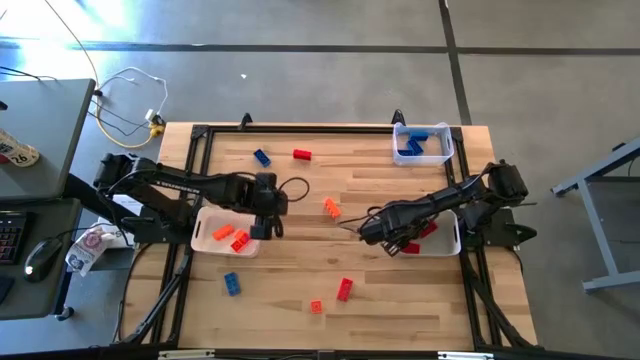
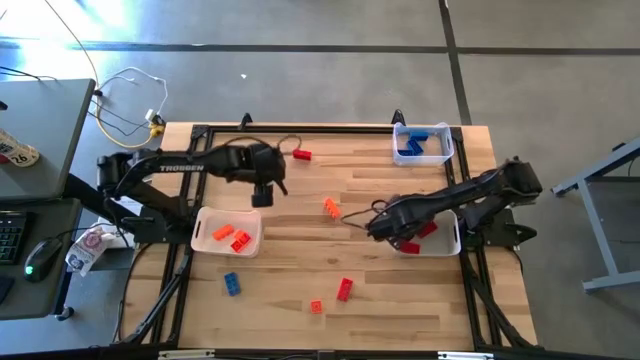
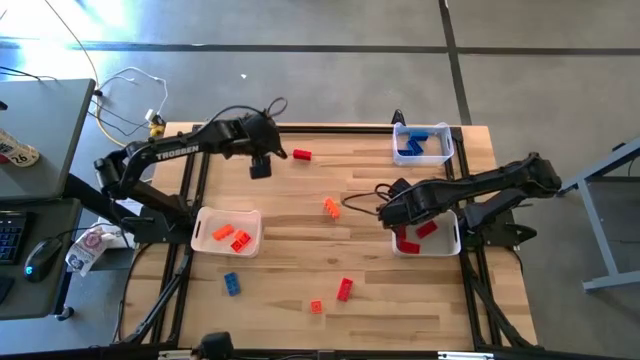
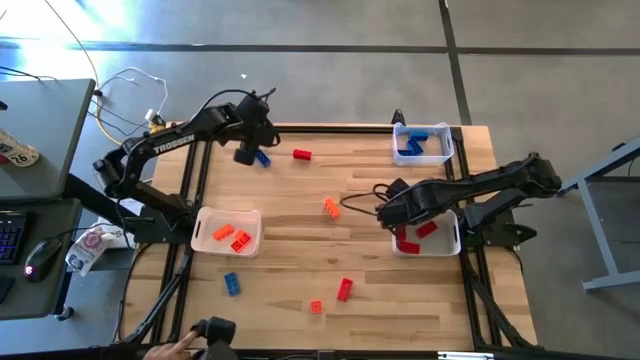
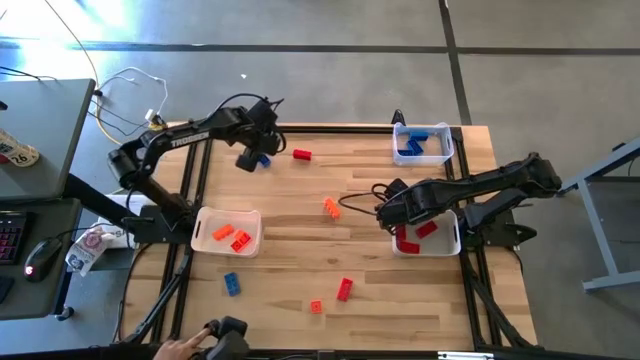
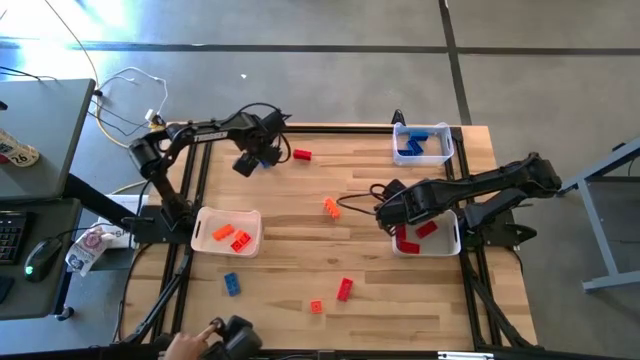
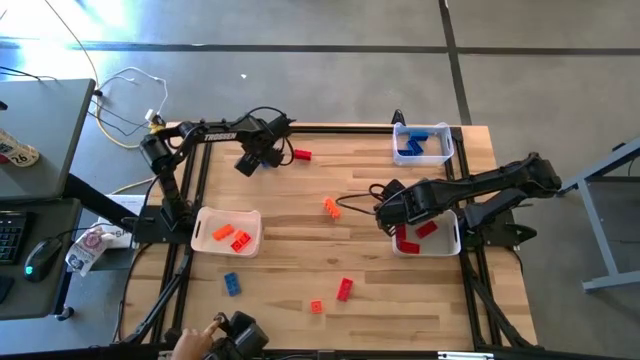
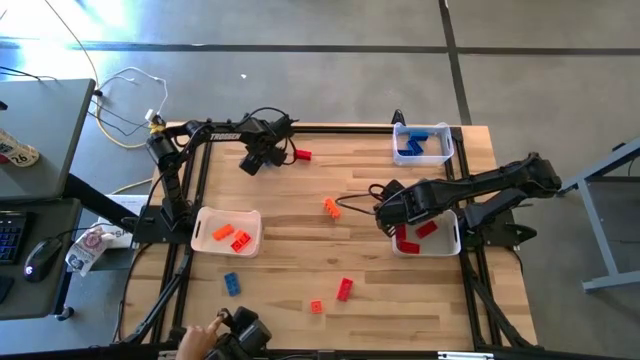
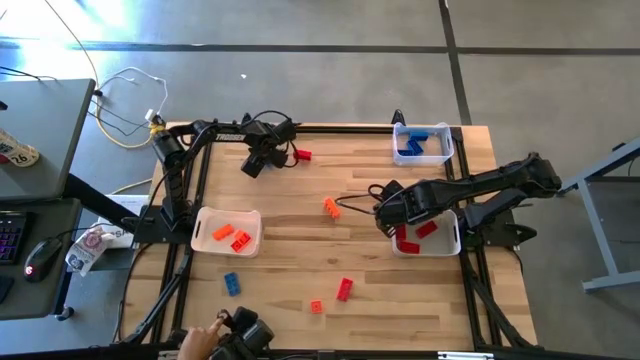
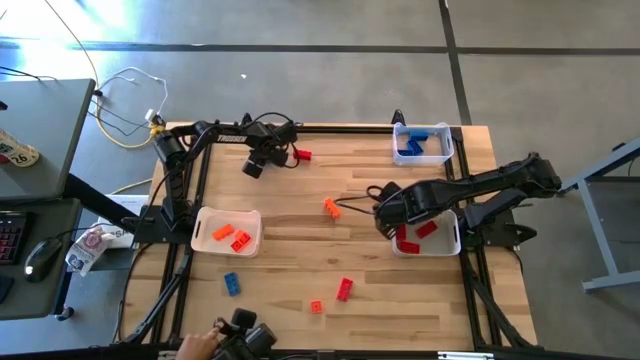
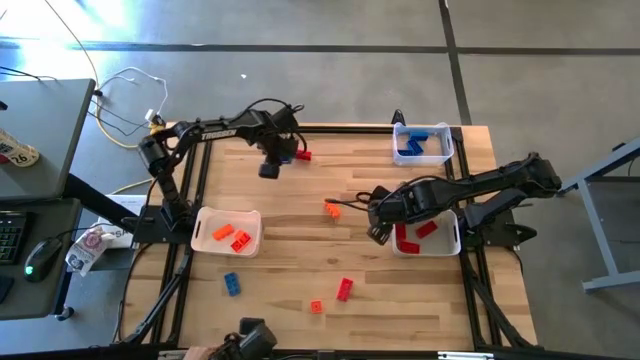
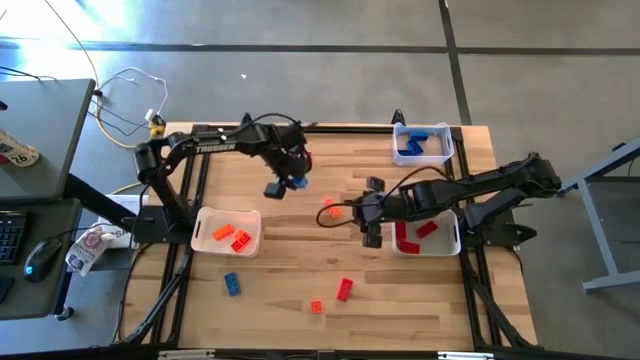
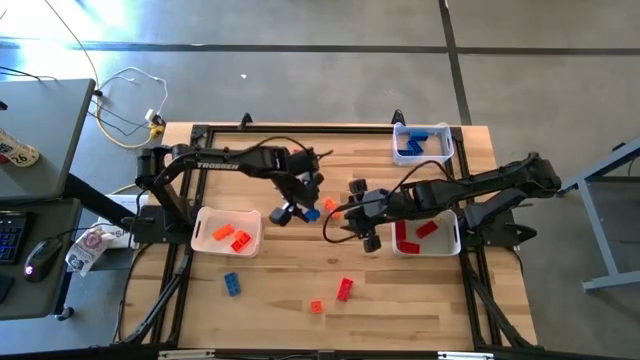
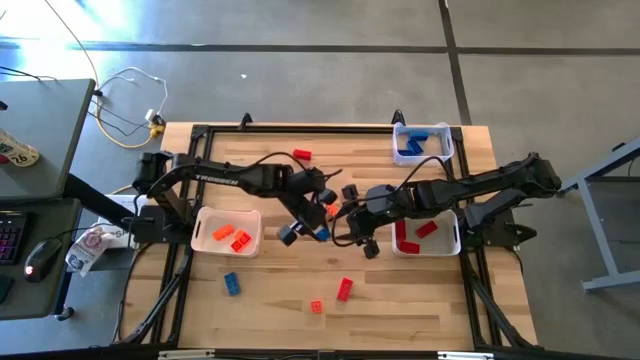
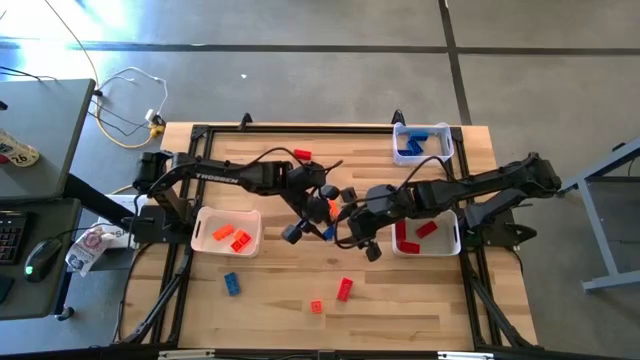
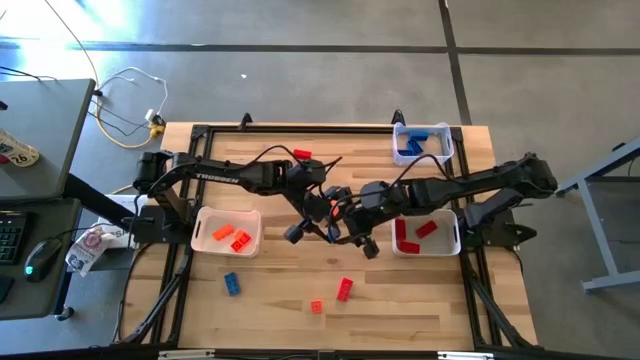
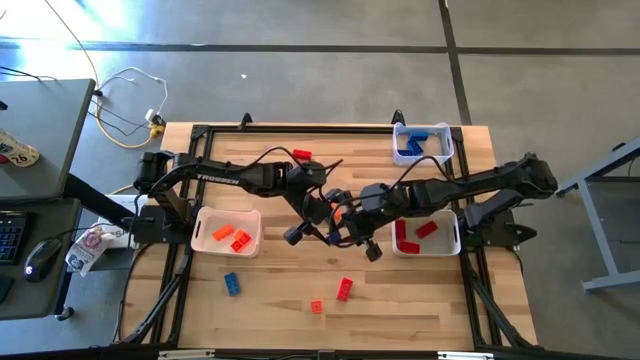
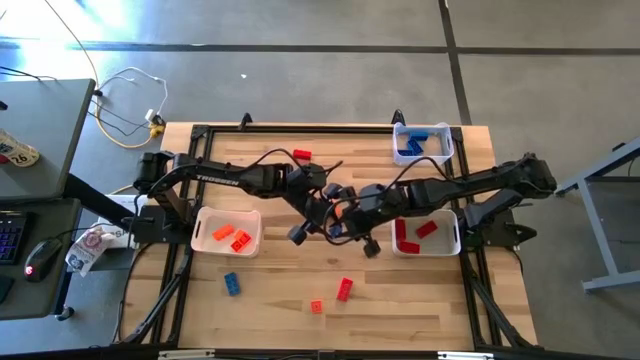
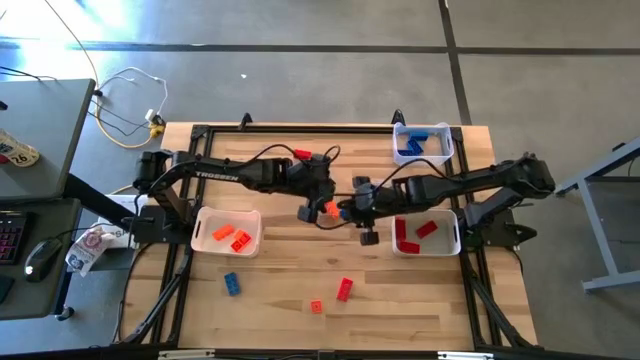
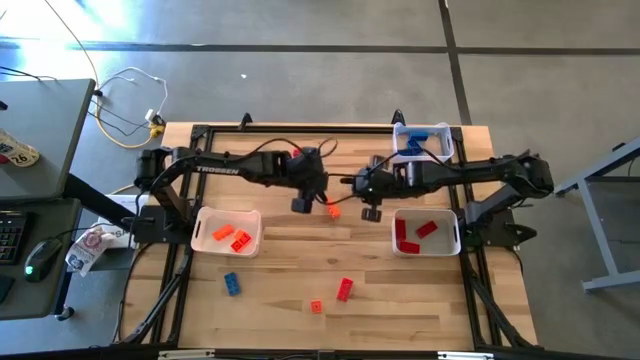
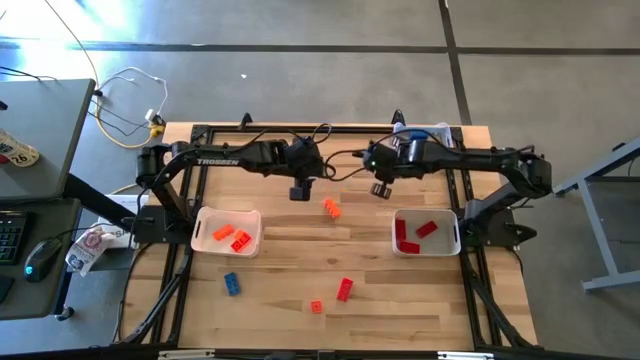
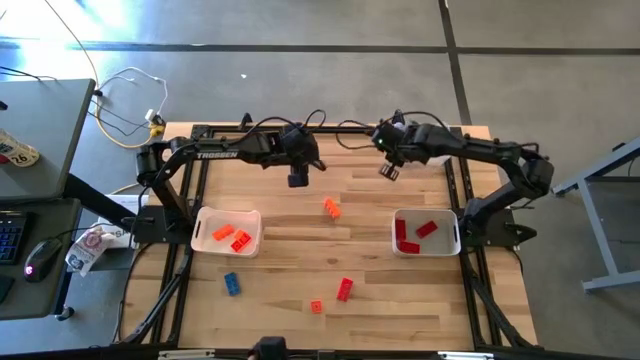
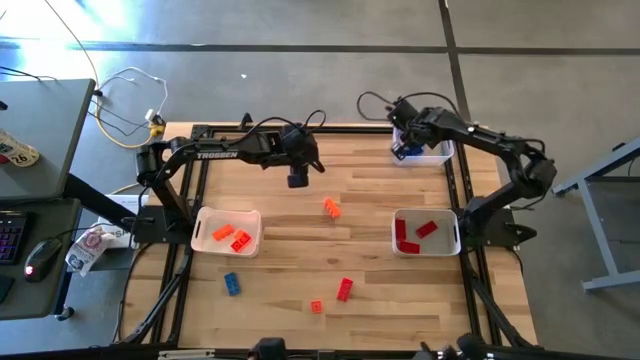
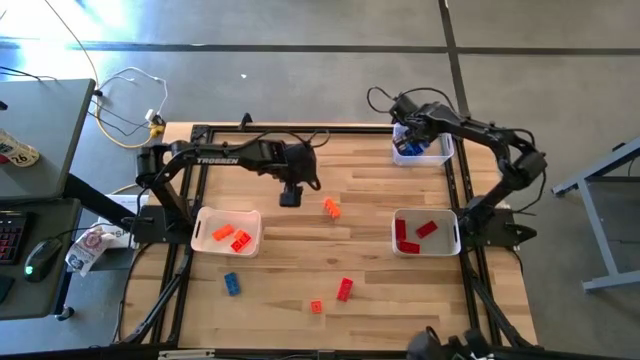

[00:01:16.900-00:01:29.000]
Task: Sort & place blocks by color
Put the blue game piece into the transparent bin

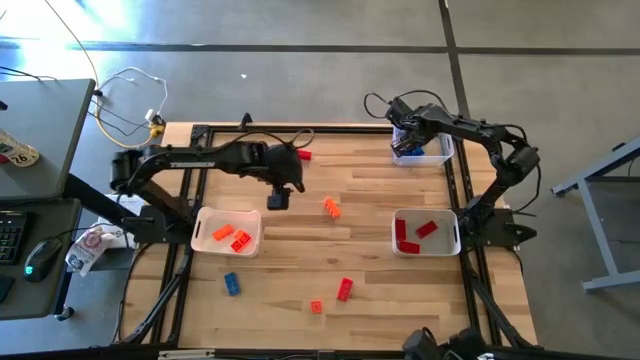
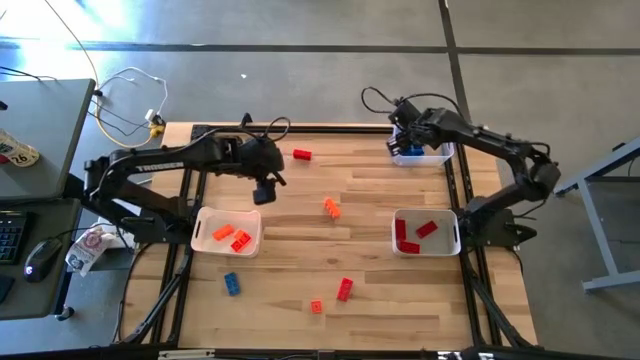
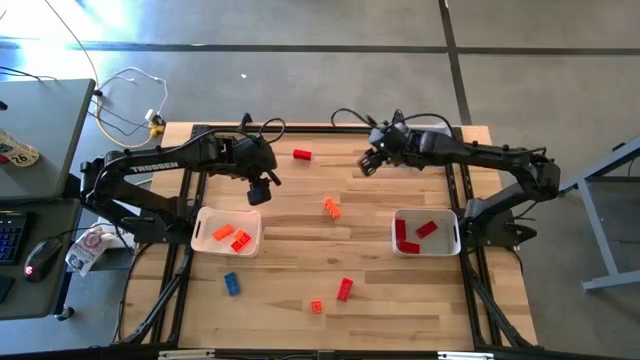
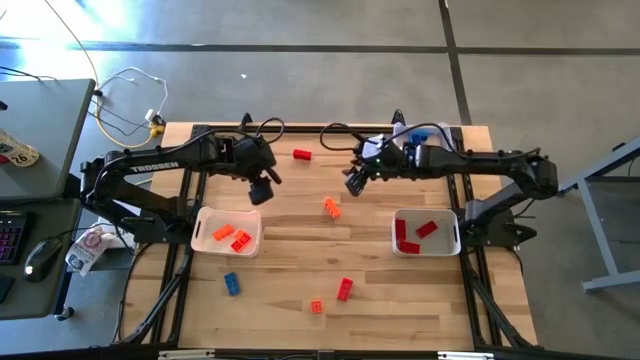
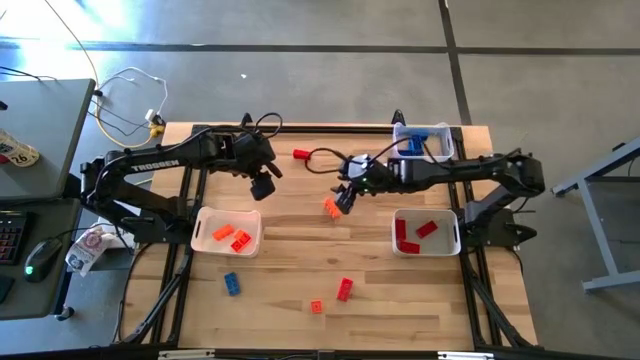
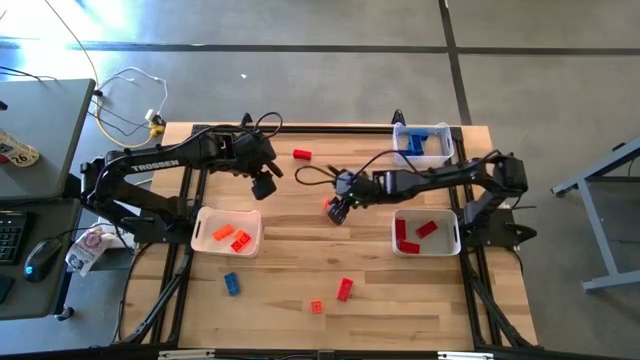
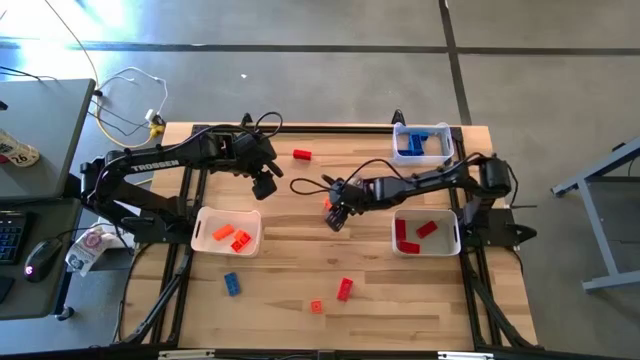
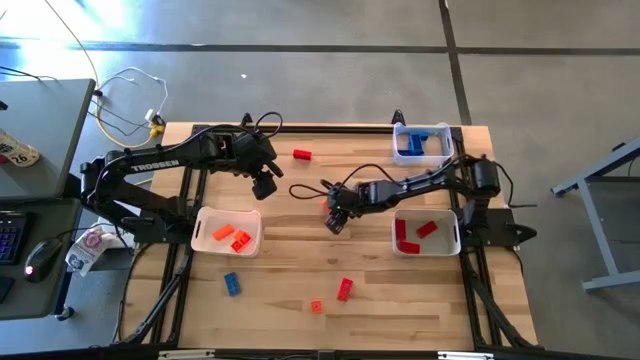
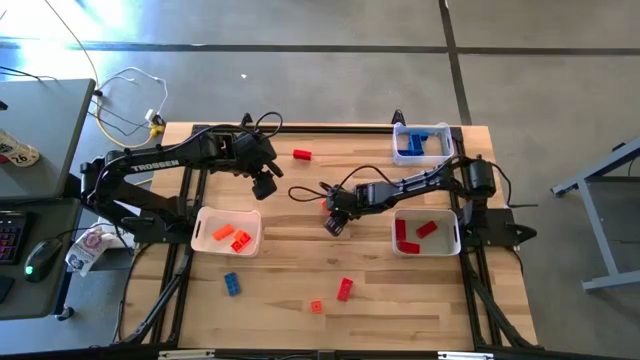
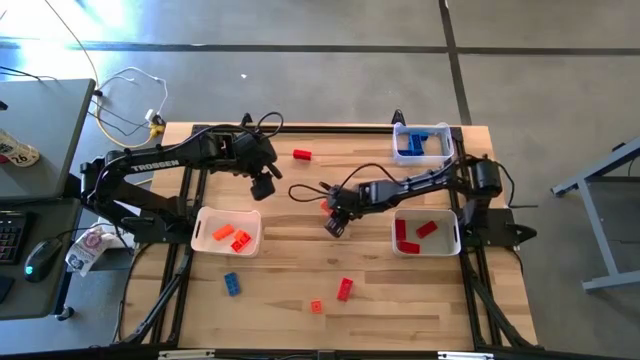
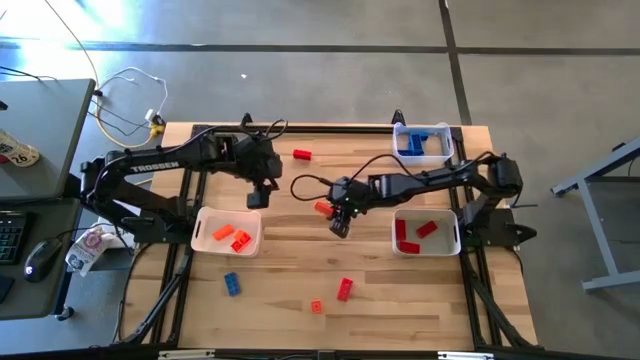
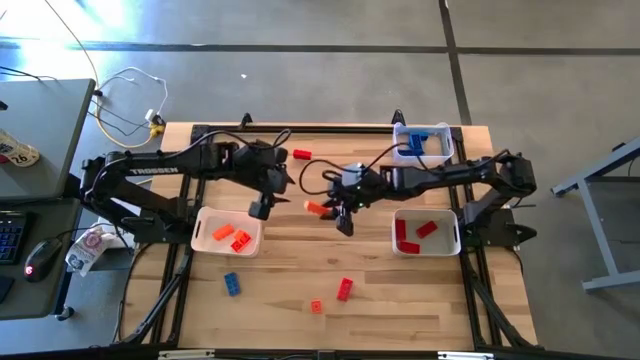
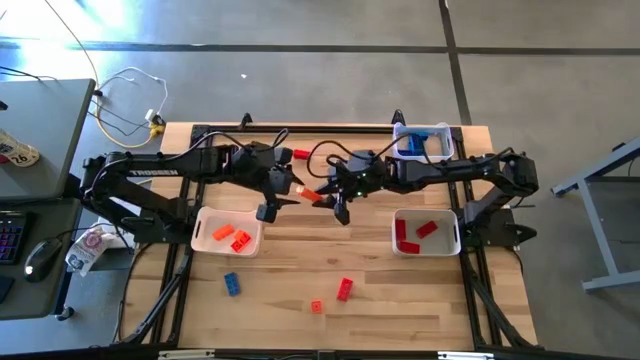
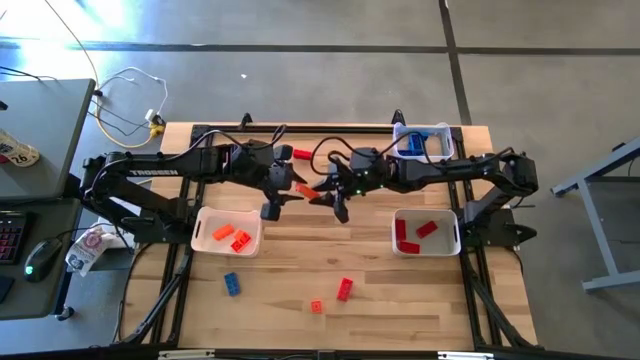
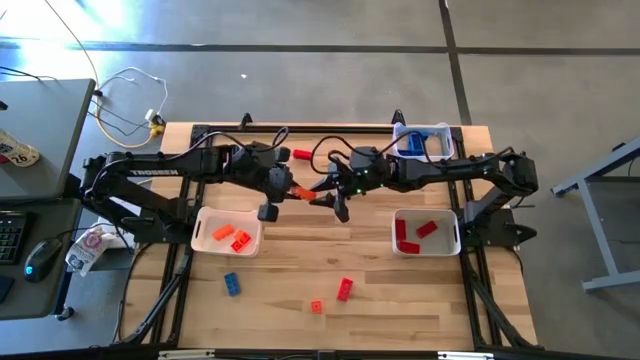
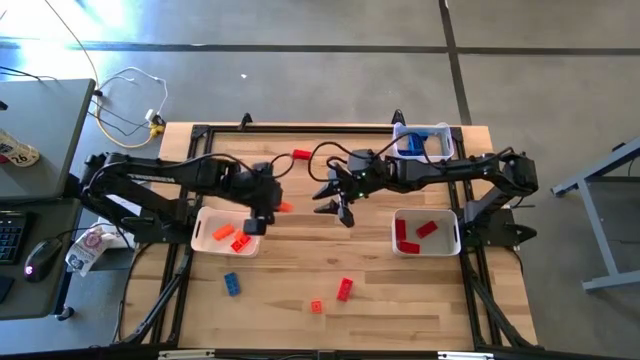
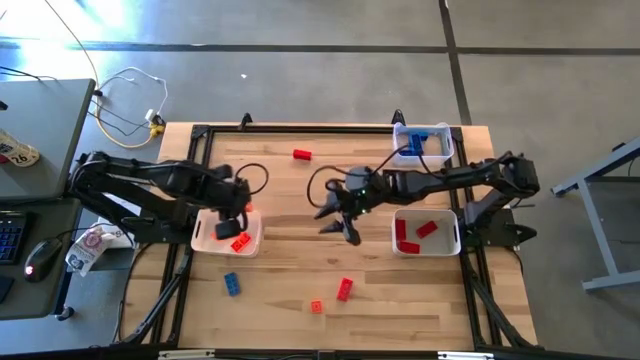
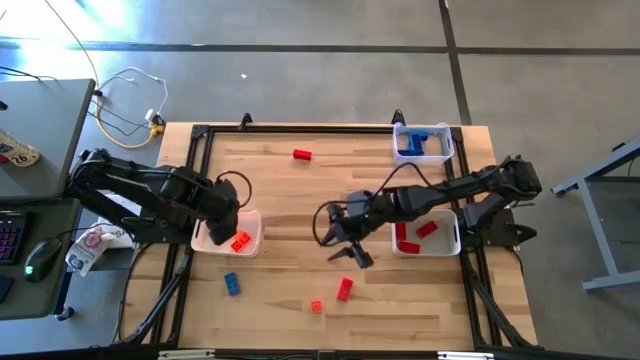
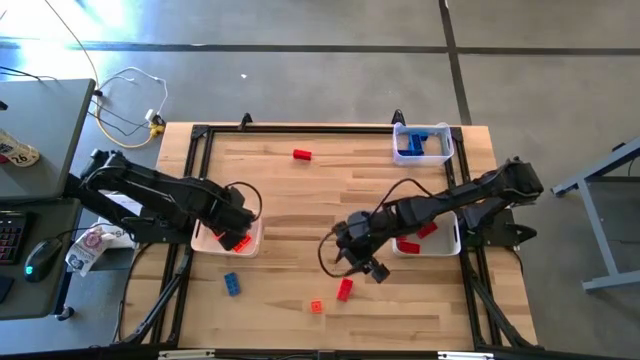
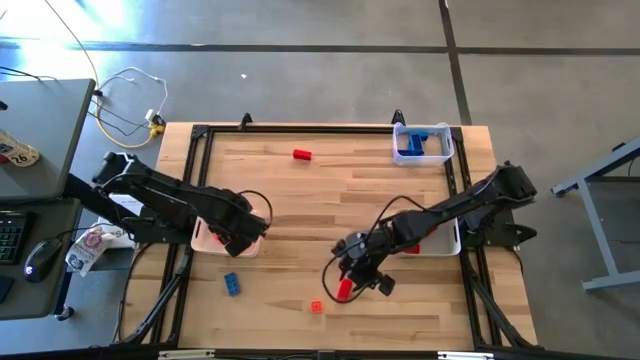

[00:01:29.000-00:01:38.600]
Put the orange game piece into the white bin
